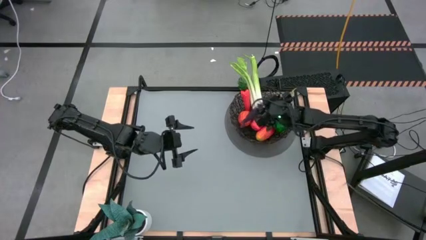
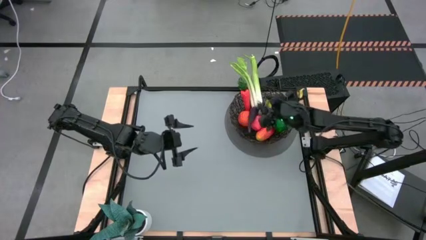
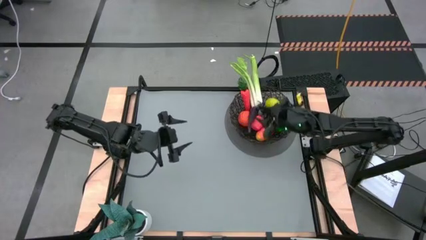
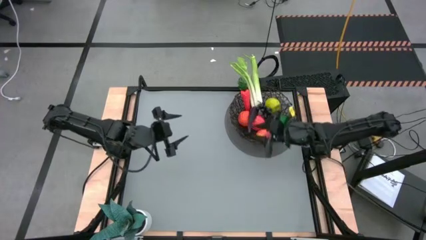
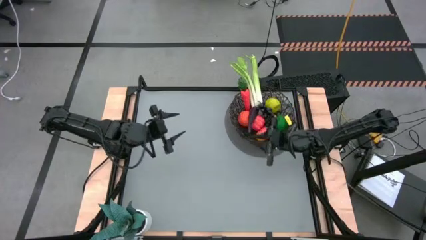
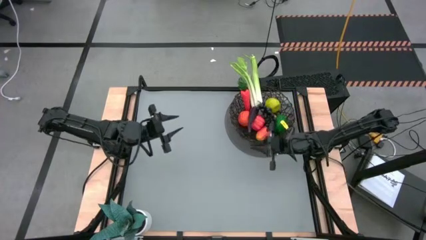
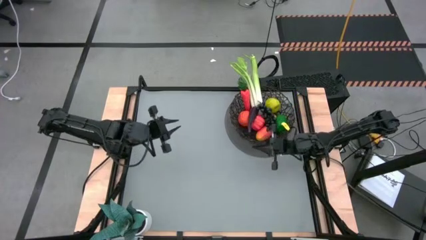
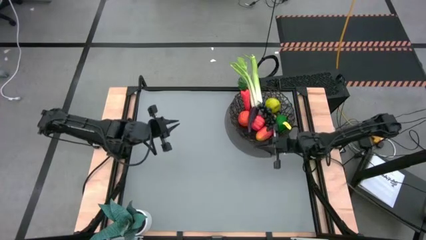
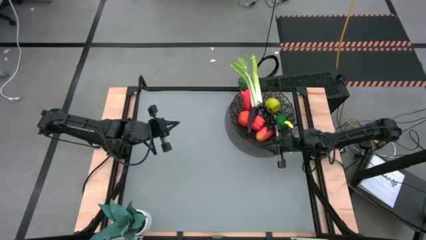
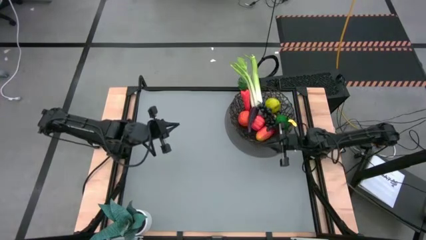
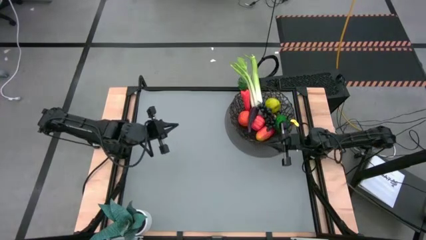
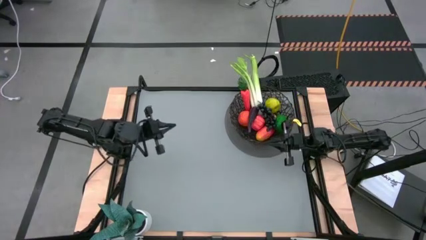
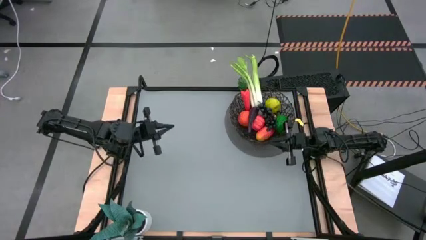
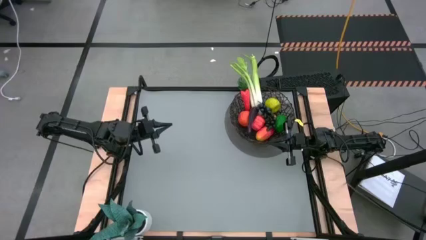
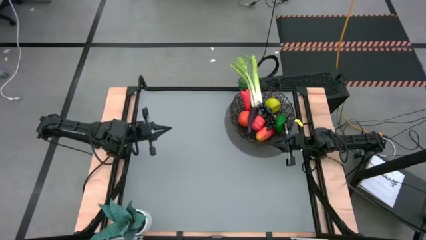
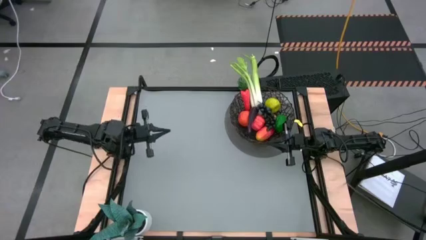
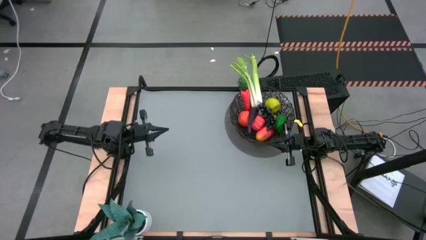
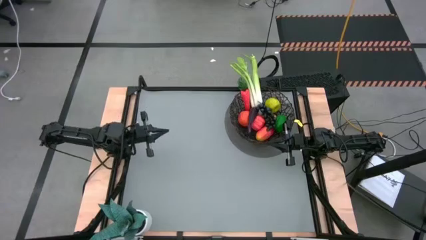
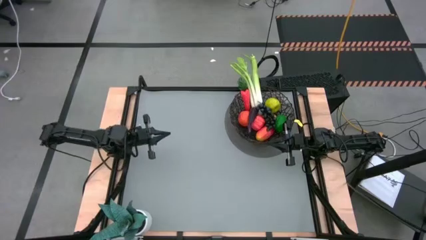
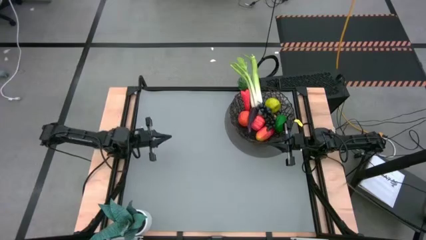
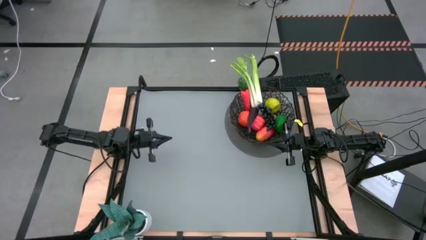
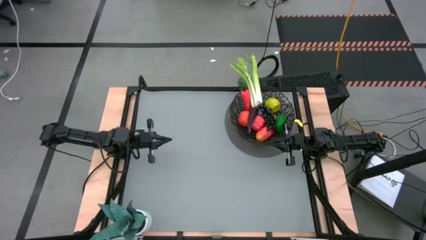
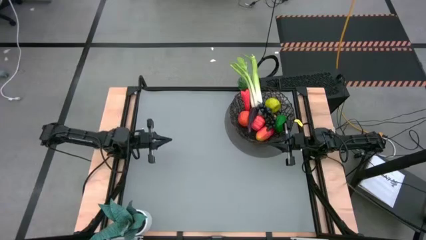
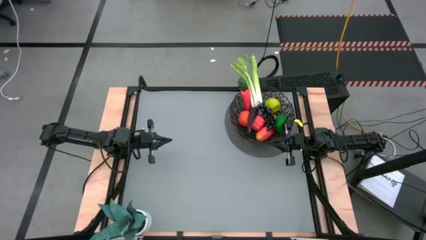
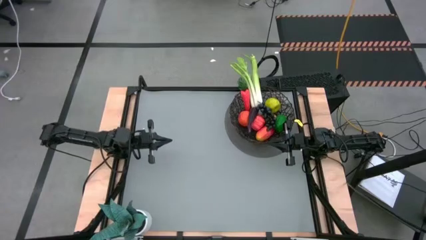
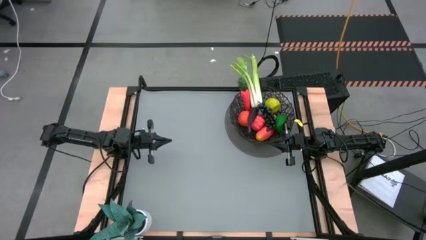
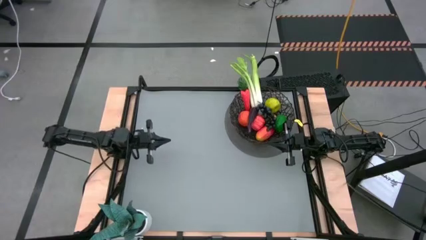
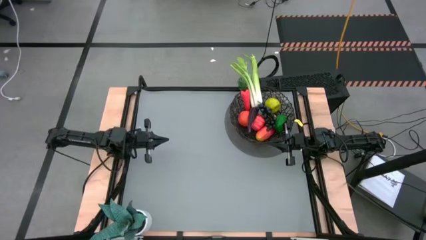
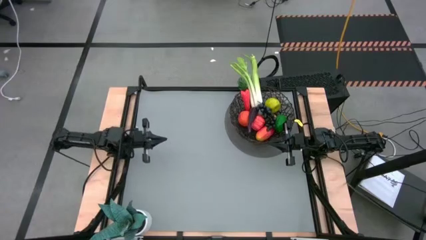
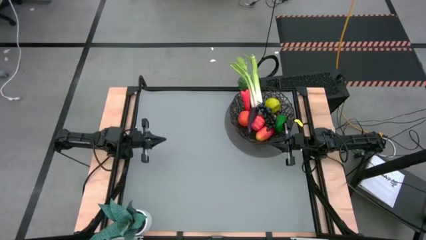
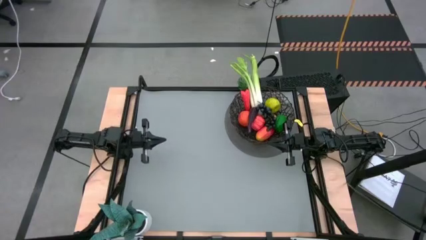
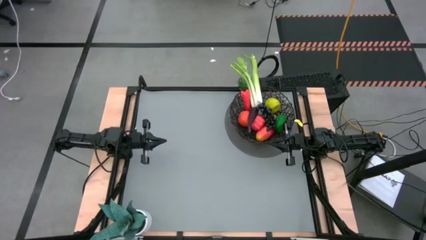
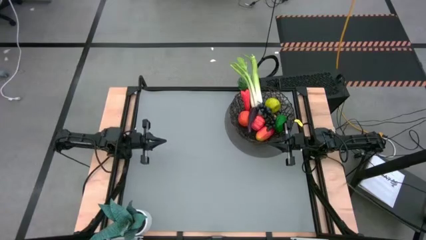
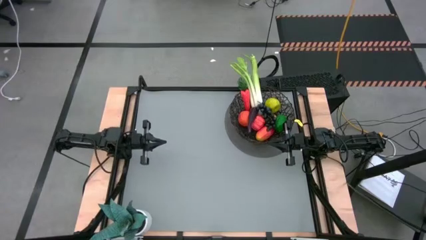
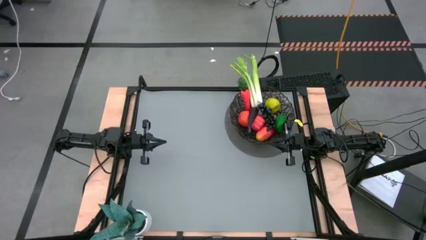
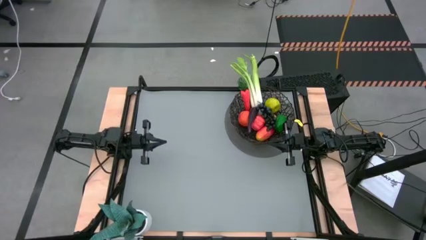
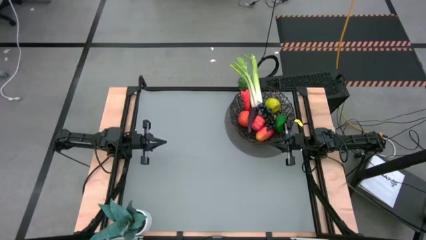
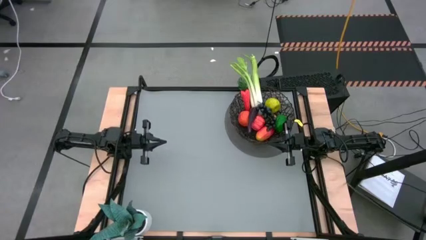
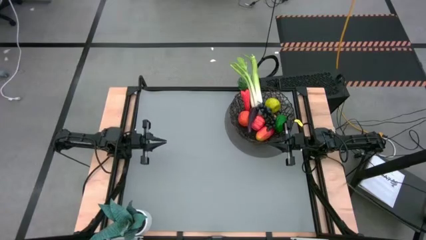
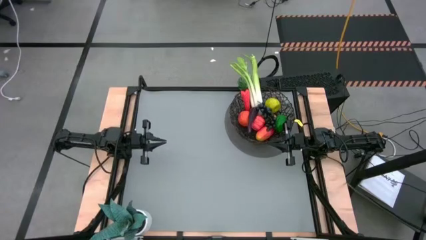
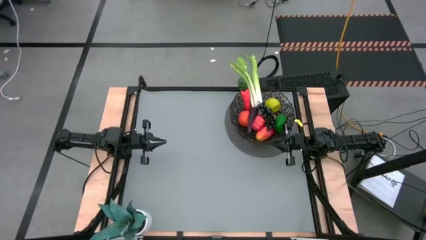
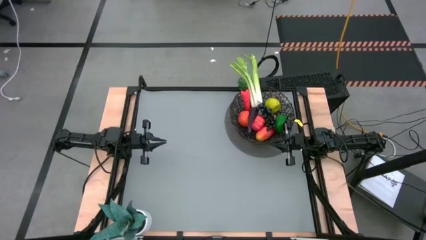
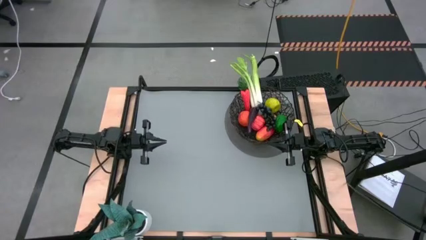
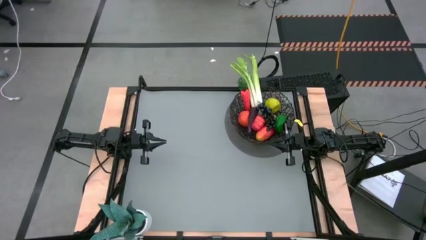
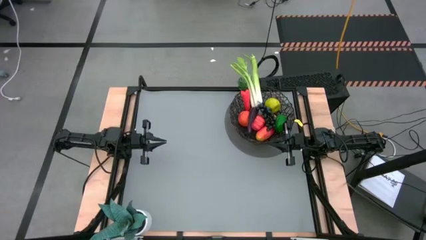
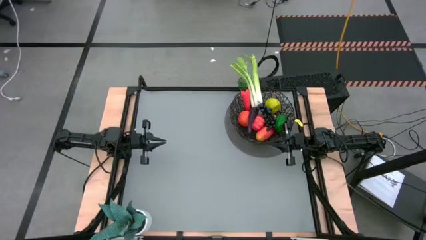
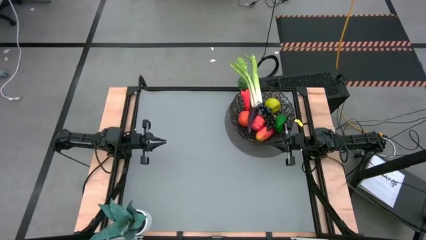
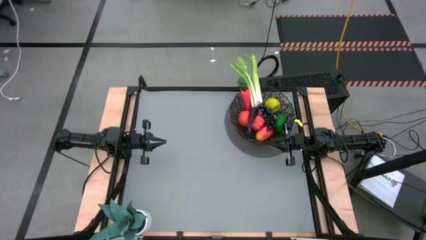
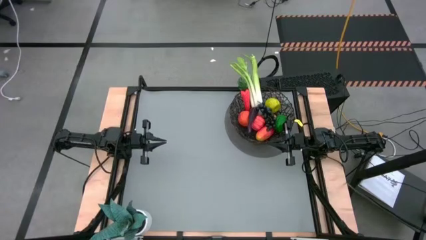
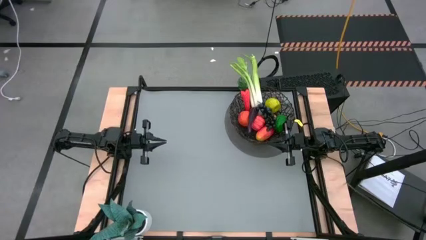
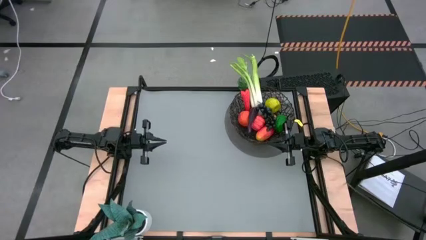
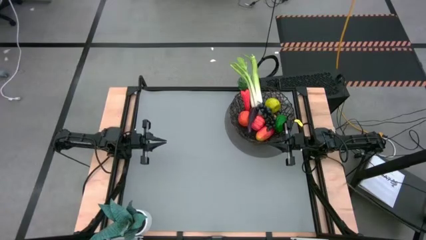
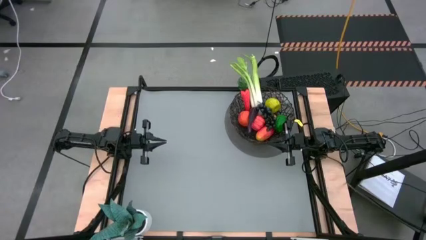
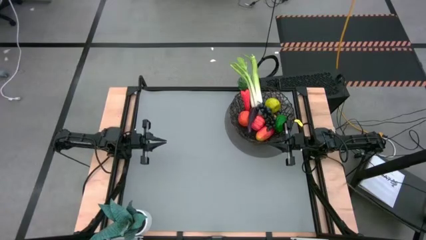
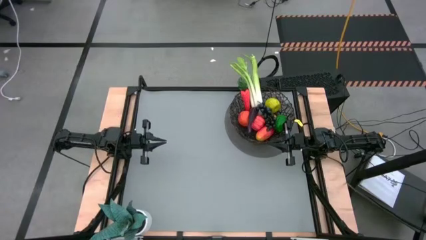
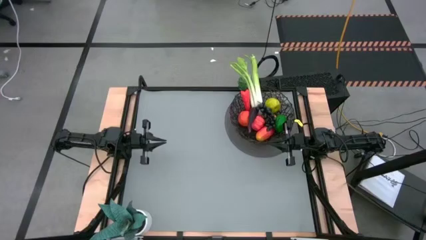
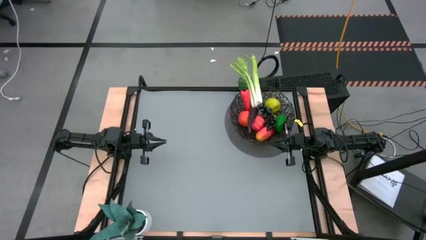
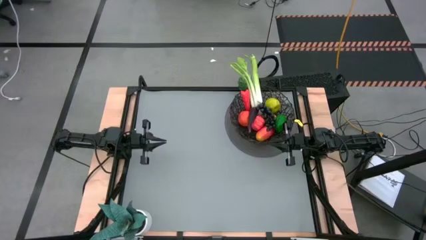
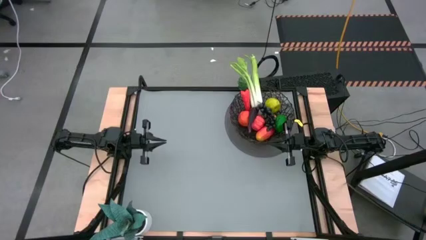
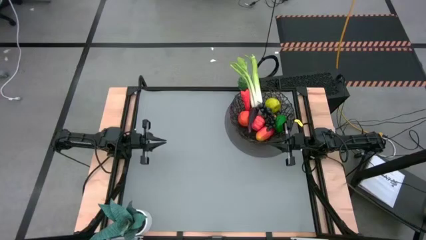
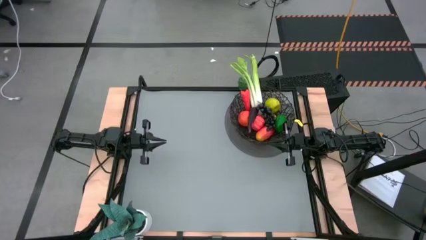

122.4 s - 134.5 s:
Task: Build produce basket
Return to Home Position

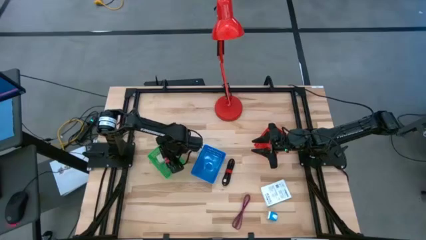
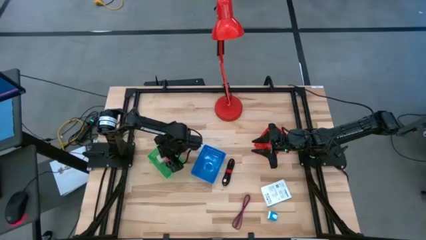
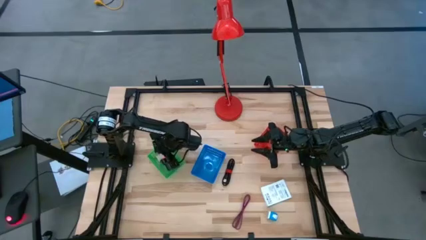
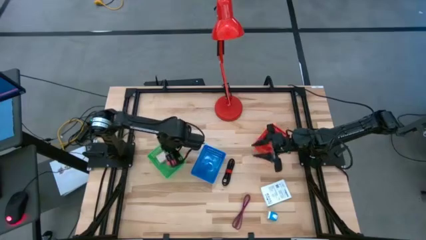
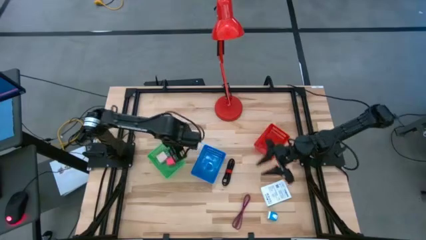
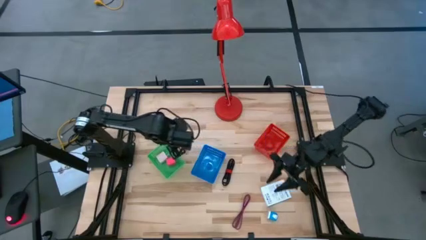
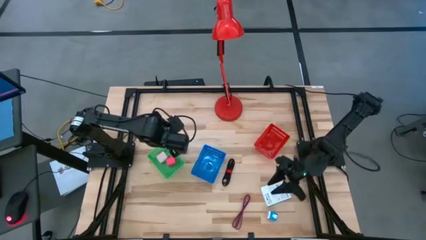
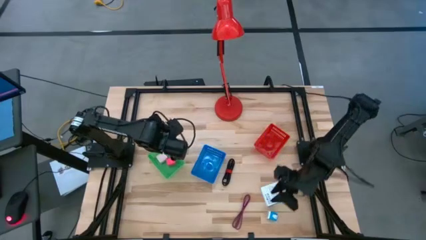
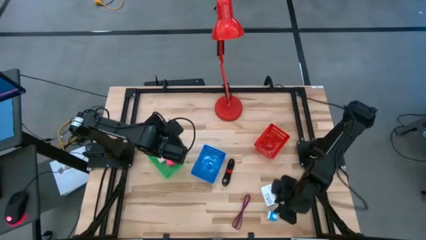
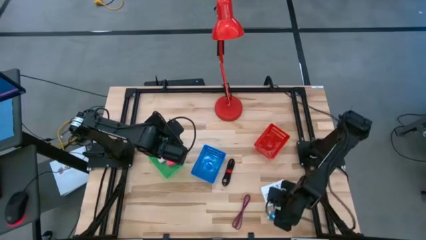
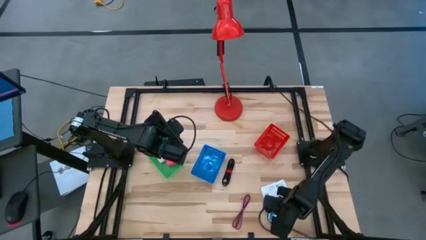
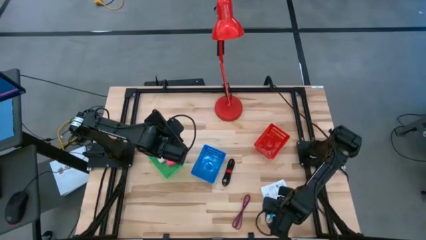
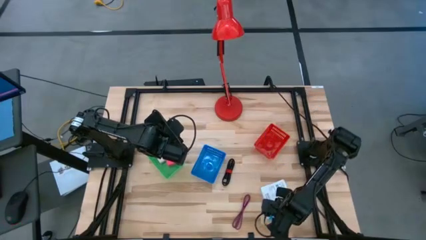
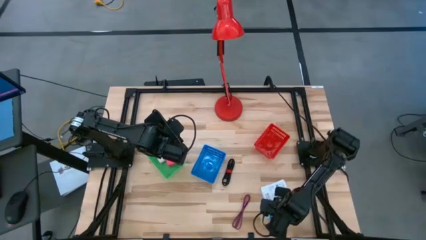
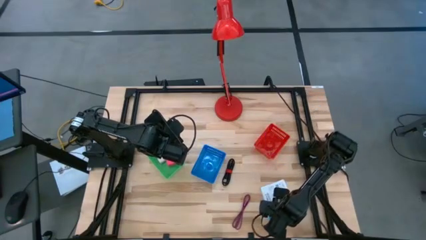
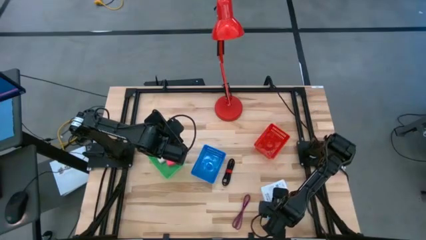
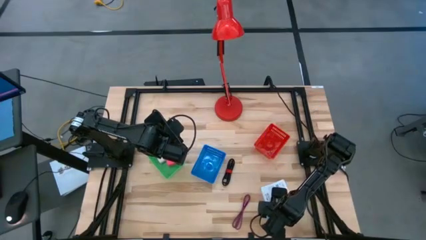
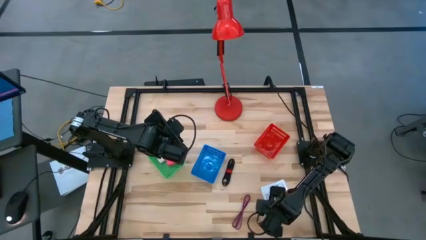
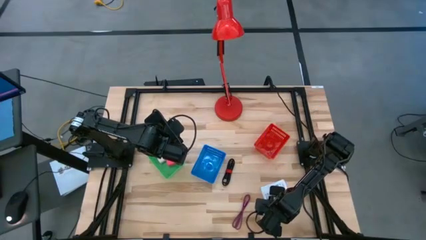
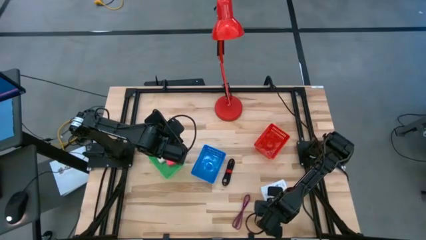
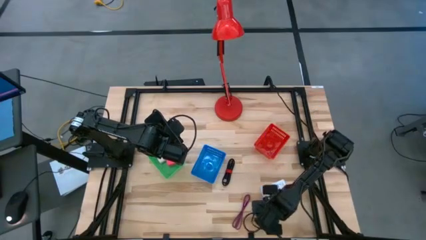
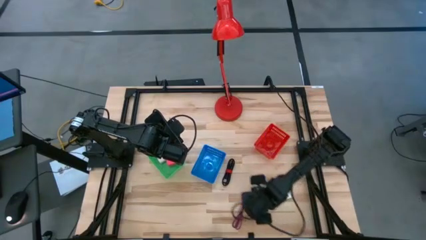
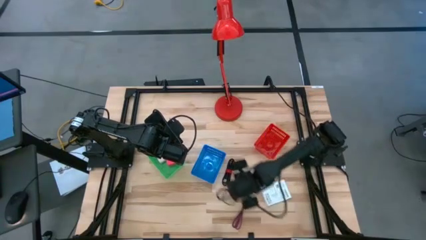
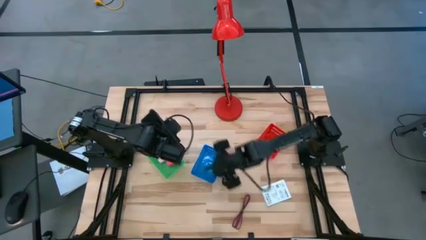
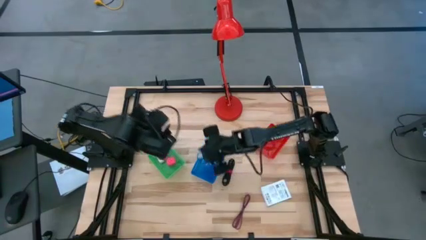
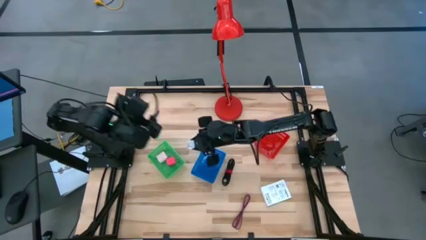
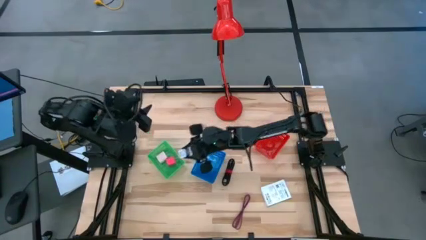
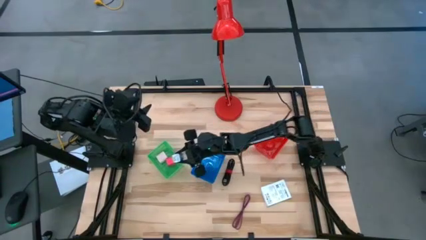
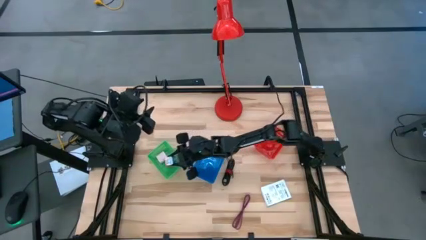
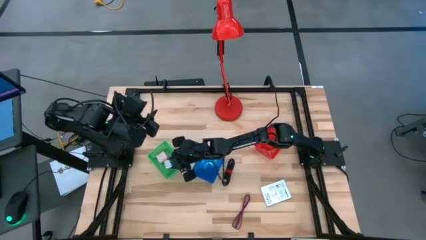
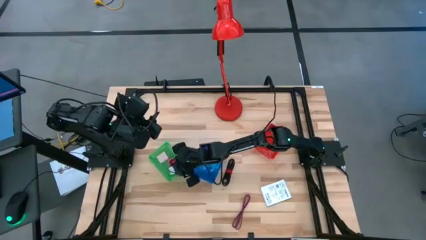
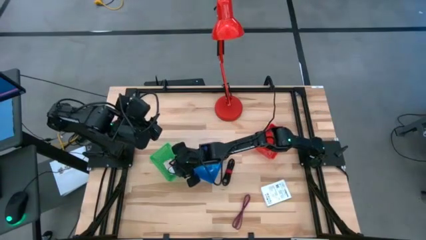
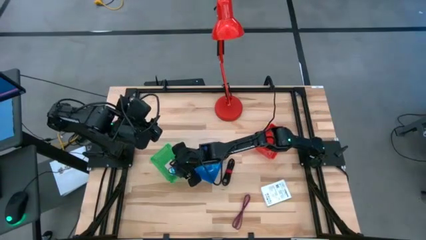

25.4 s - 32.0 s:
Task: Pick and place items into bin
Put the blue charger adapter into the green basket
